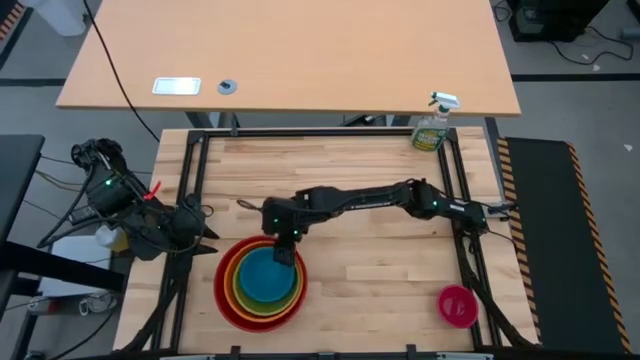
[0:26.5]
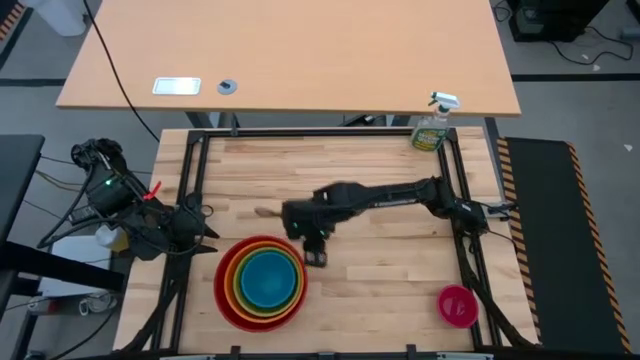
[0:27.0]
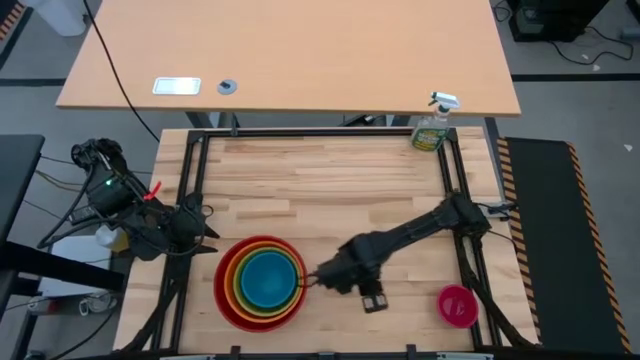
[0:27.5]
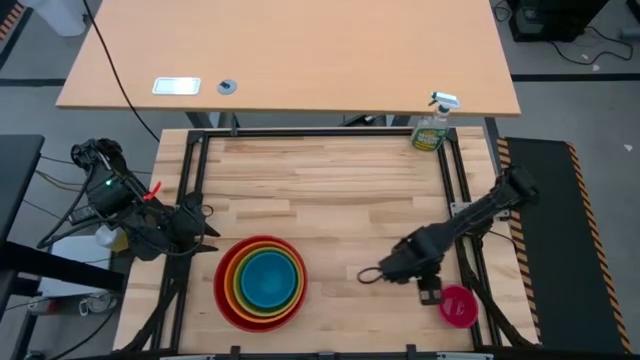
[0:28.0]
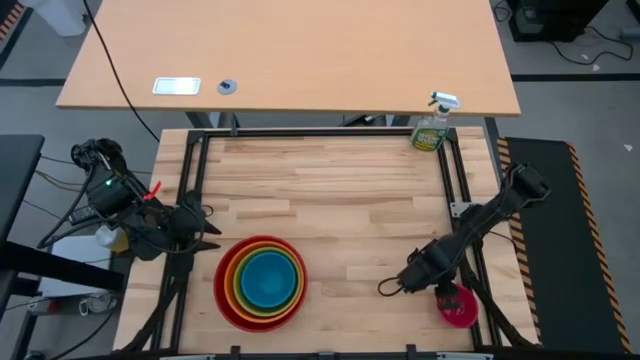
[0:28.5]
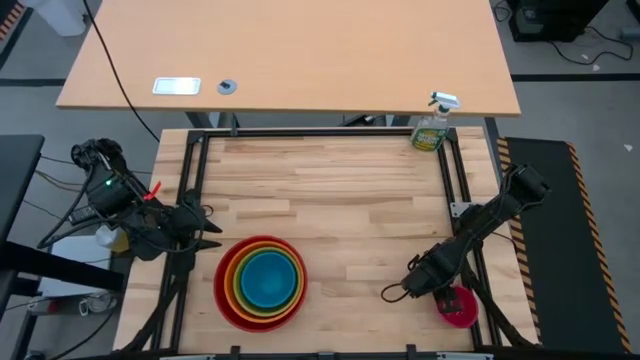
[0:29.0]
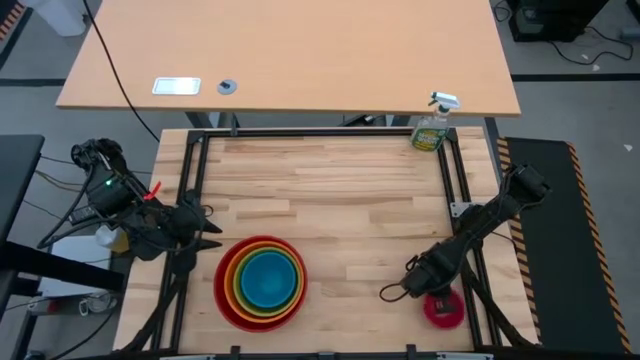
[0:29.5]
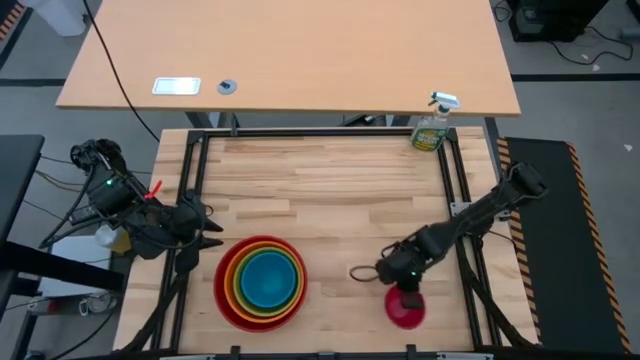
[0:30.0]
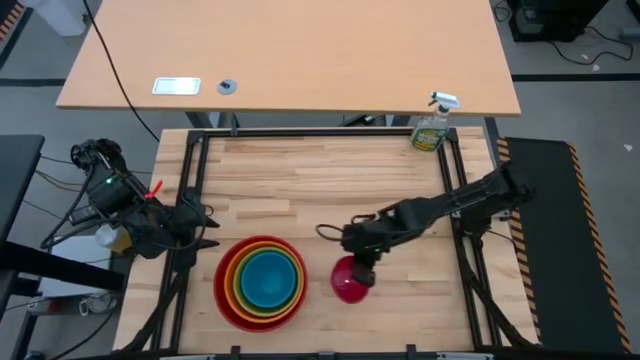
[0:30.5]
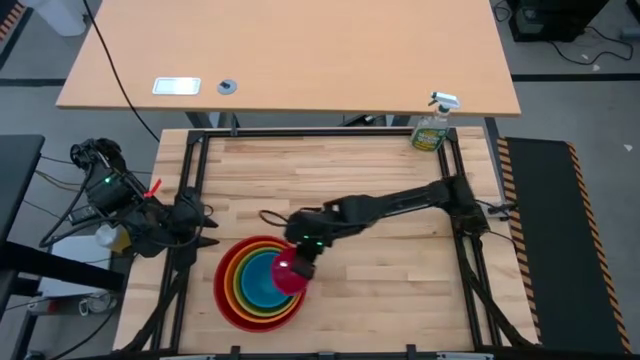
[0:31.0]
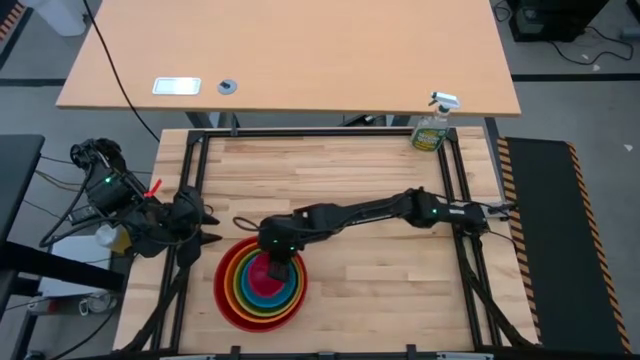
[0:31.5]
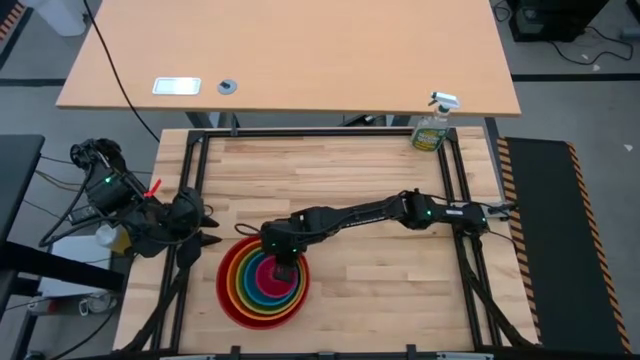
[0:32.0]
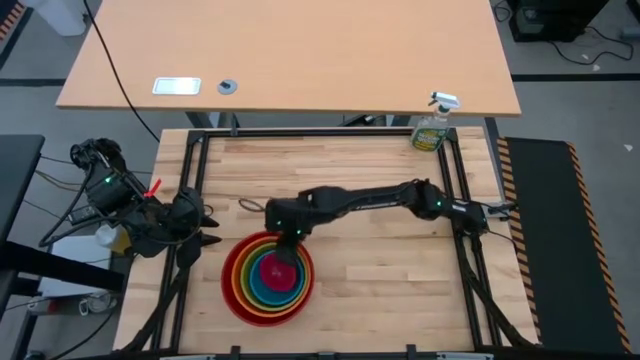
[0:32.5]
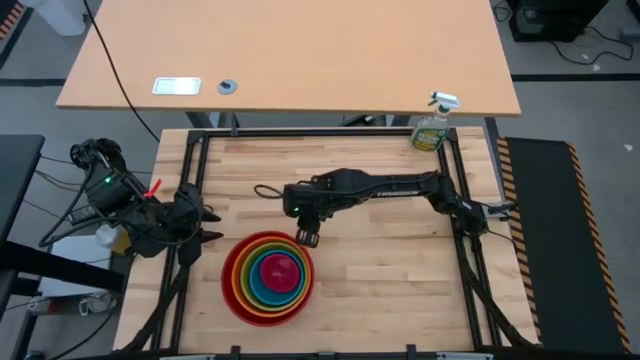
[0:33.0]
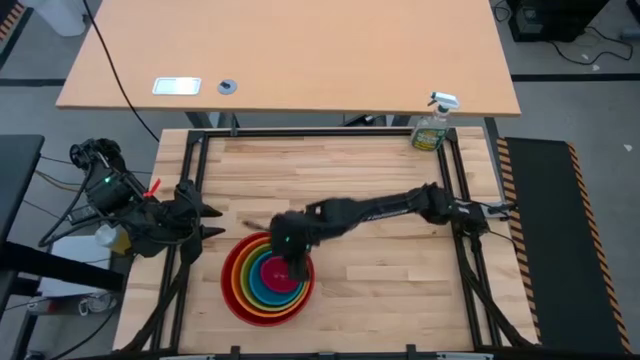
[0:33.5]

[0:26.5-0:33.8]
Stack the pink bowl into the blue bowl

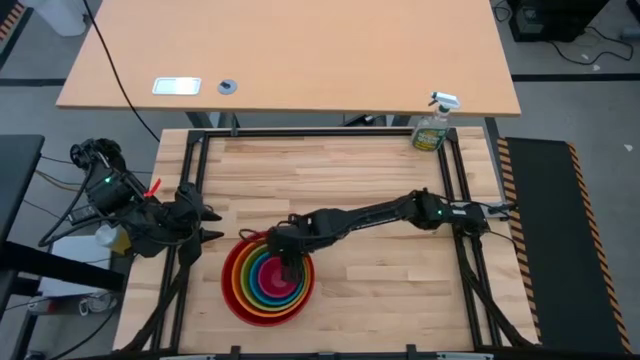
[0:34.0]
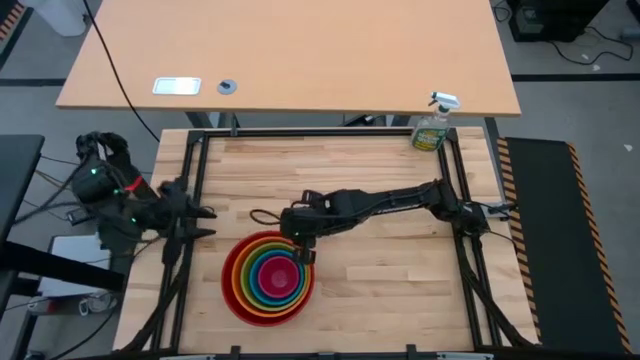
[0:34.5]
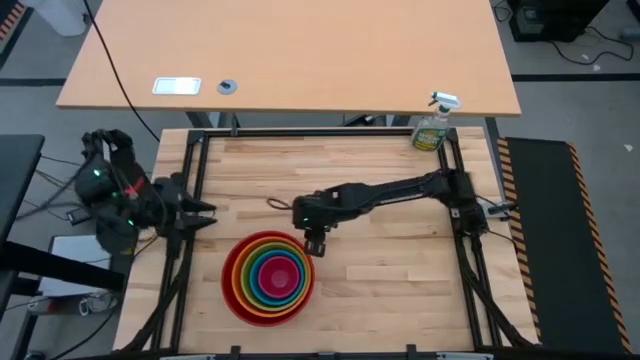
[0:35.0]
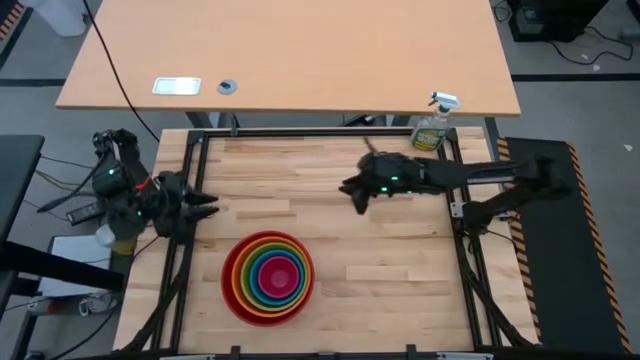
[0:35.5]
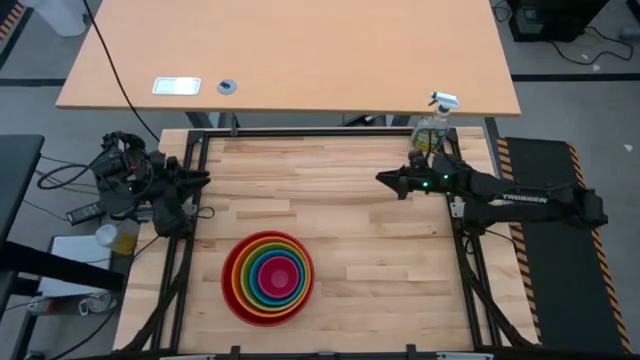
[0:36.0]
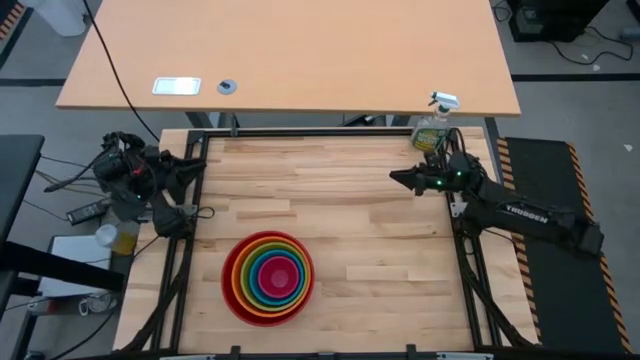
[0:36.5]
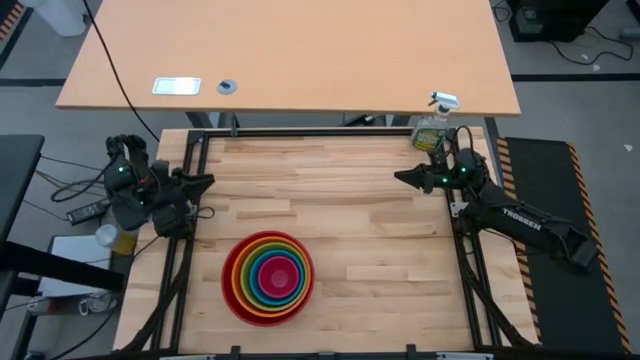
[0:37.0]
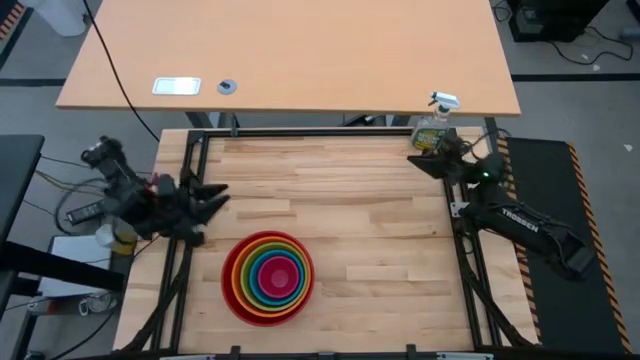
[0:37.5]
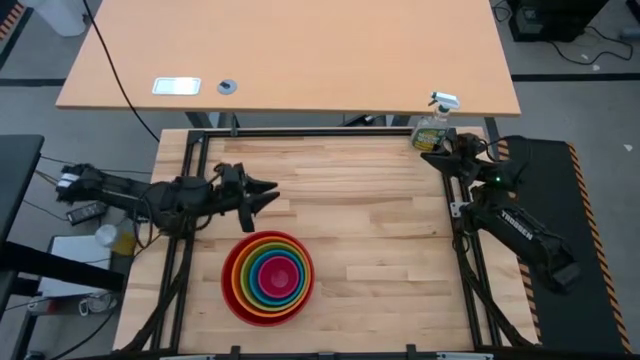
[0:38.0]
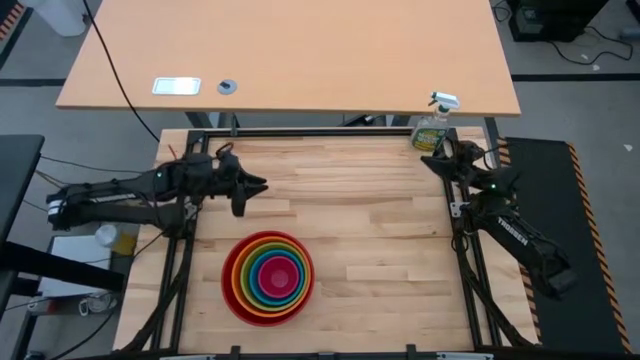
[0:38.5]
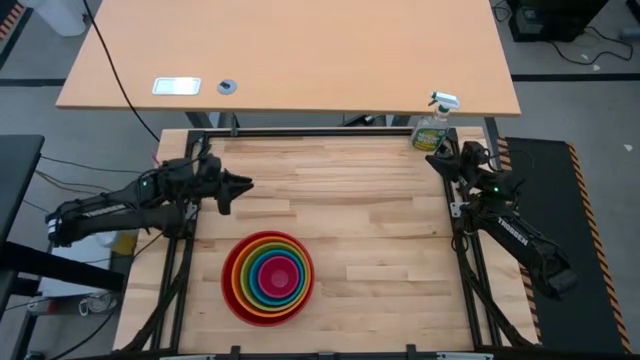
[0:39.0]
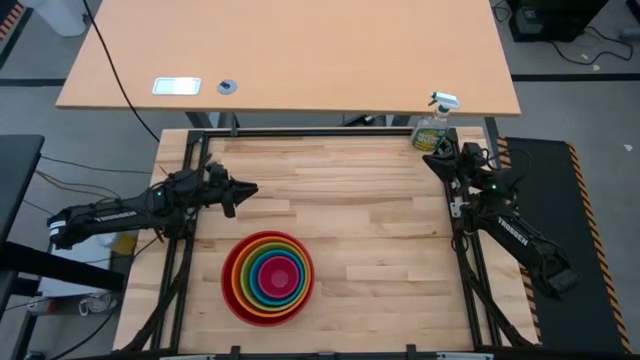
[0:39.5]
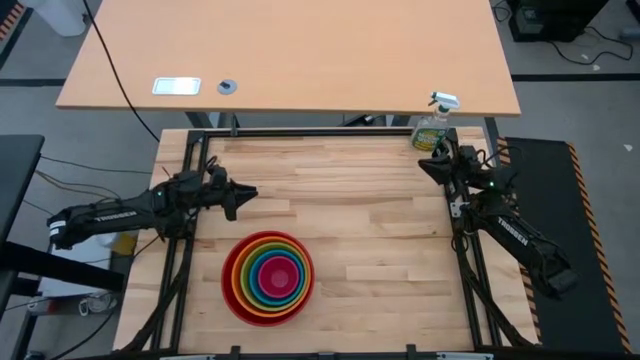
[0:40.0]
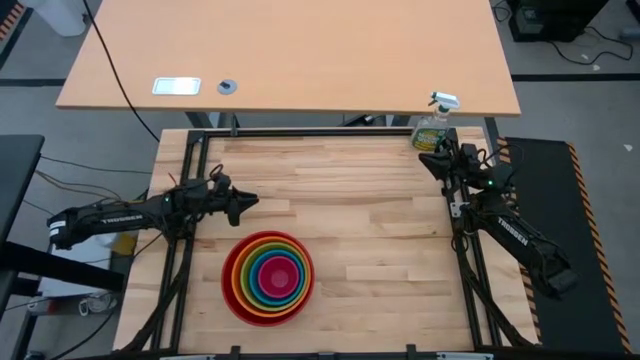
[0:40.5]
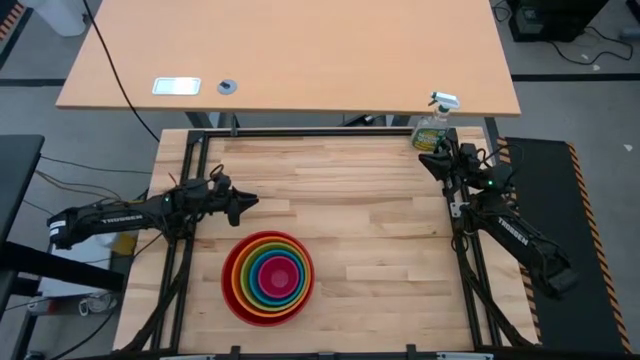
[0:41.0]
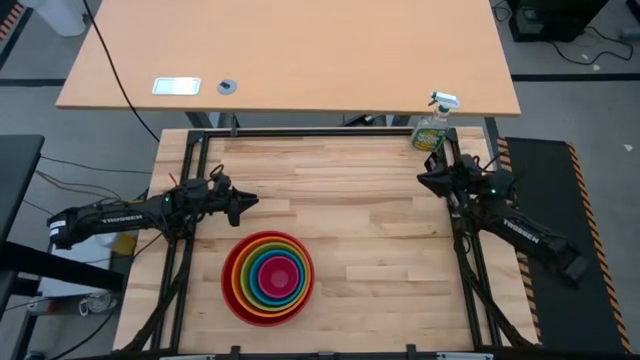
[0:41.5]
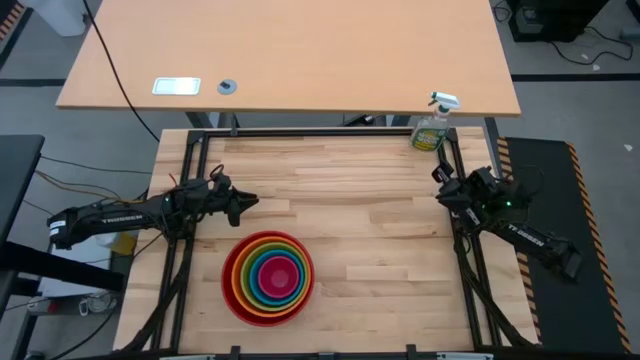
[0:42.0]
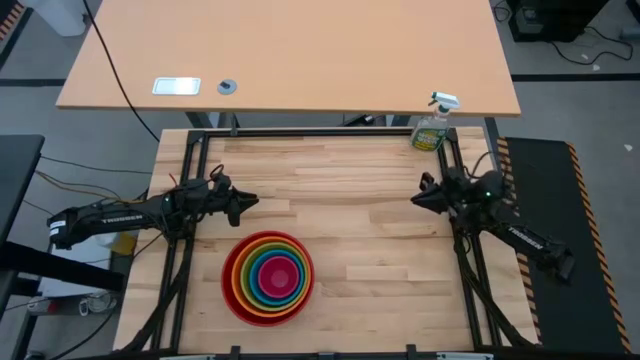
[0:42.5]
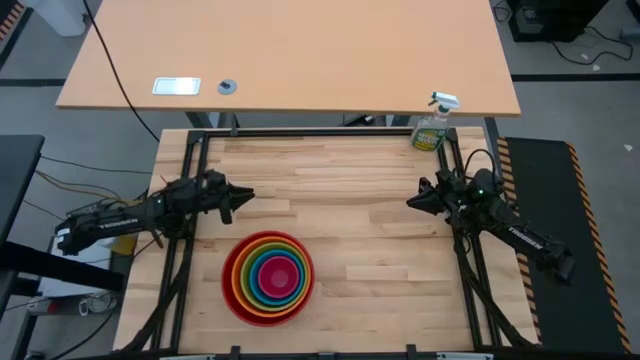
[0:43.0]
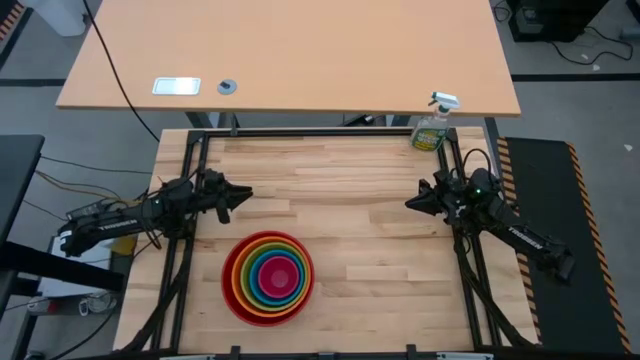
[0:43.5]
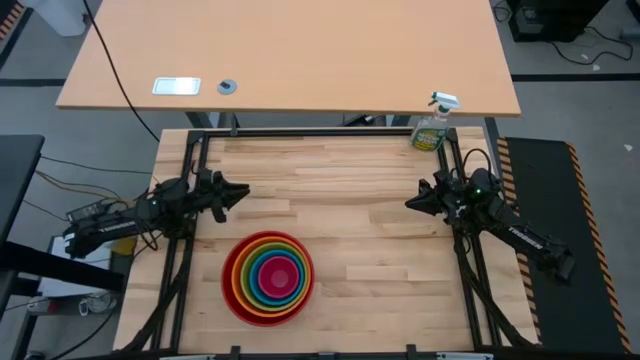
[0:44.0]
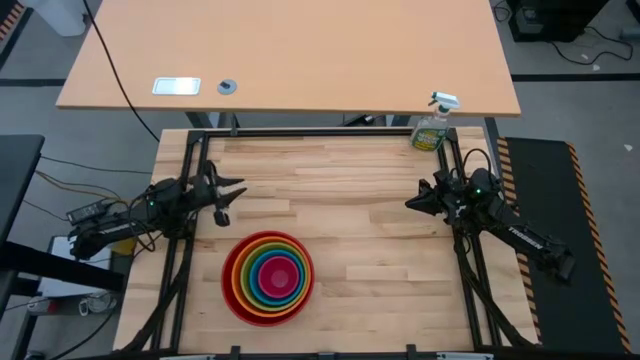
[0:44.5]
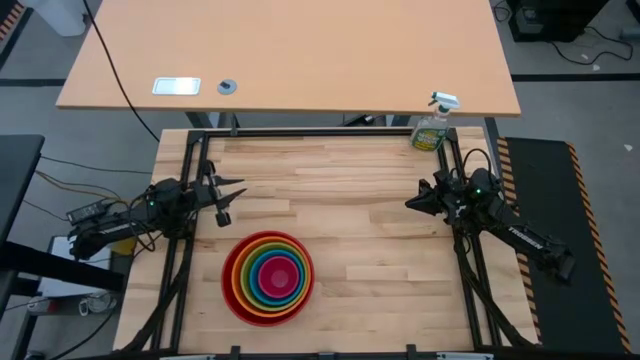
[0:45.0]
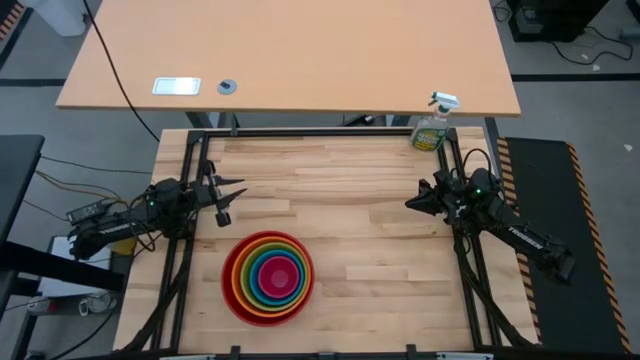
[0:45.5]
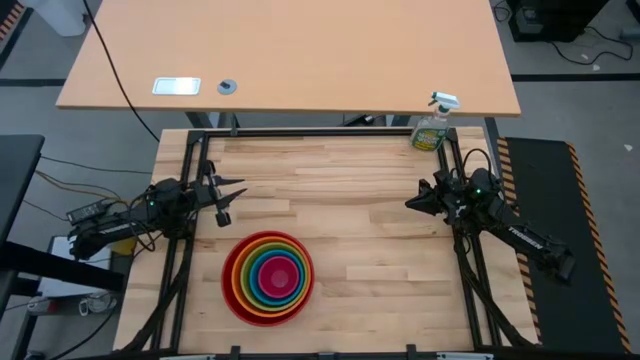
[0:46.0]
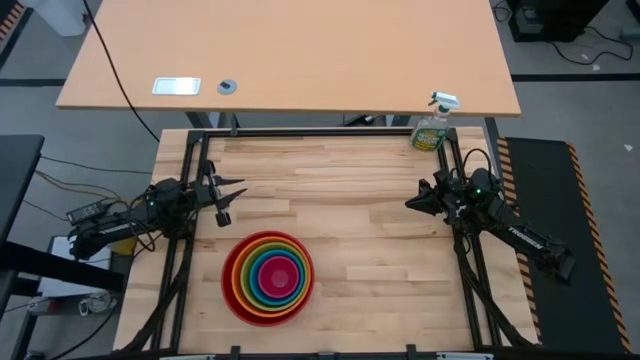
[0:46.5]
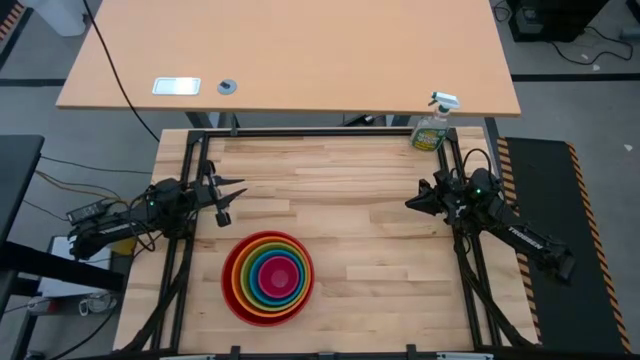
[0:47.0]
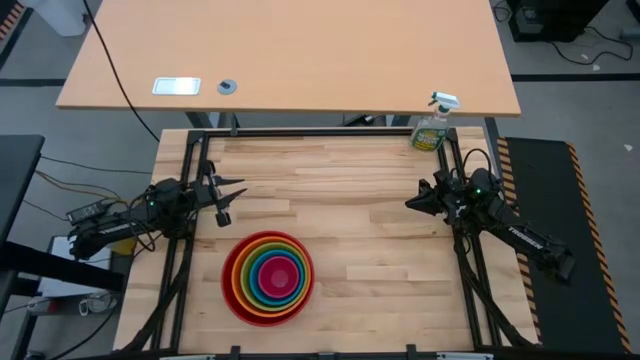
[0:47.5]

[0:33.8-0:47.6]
Return to home position
